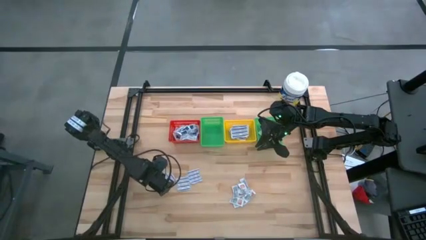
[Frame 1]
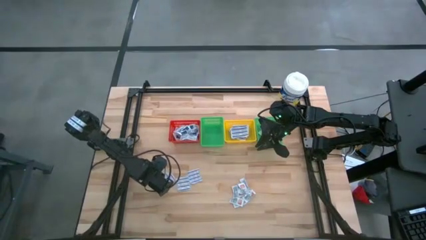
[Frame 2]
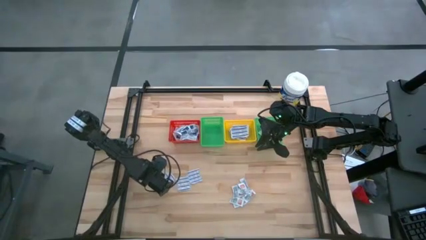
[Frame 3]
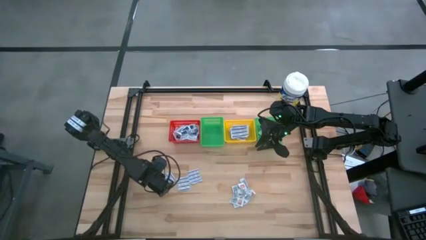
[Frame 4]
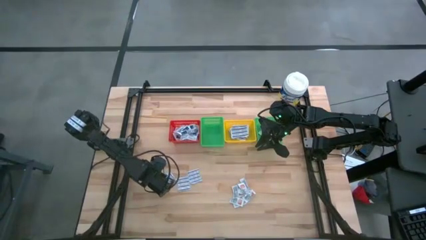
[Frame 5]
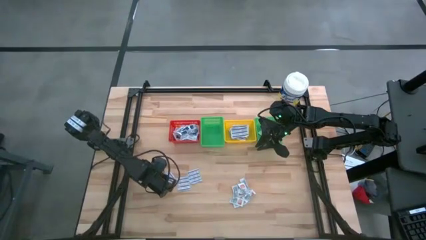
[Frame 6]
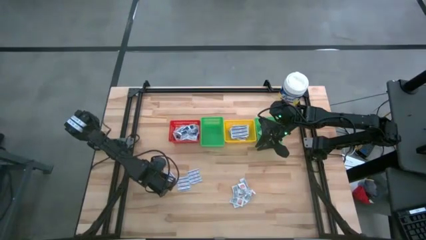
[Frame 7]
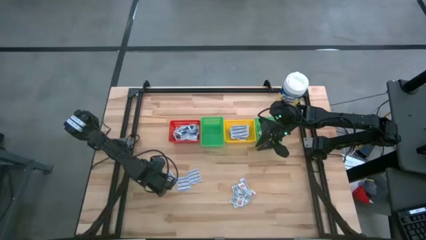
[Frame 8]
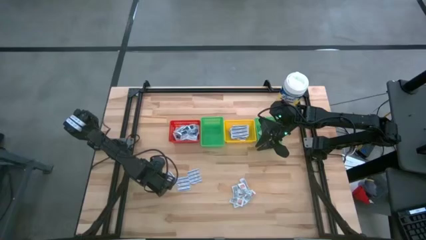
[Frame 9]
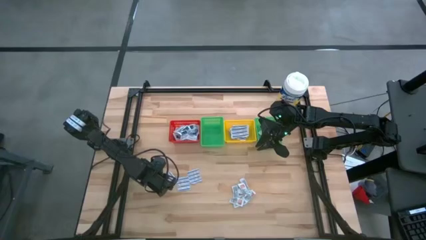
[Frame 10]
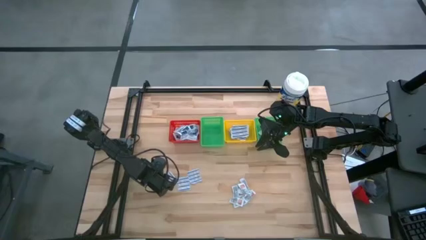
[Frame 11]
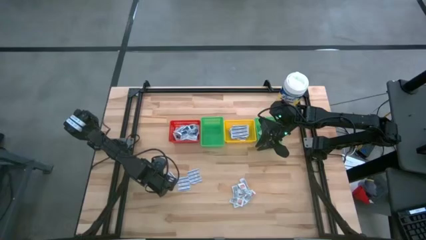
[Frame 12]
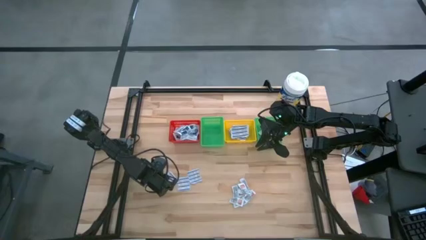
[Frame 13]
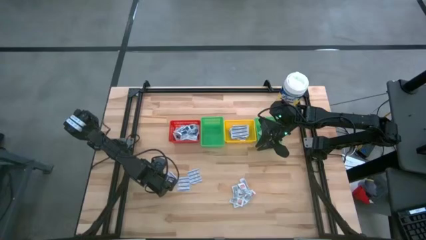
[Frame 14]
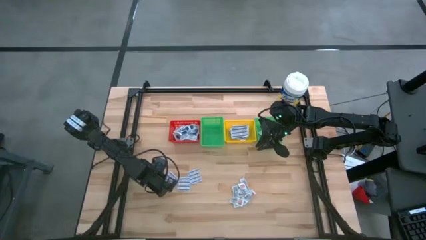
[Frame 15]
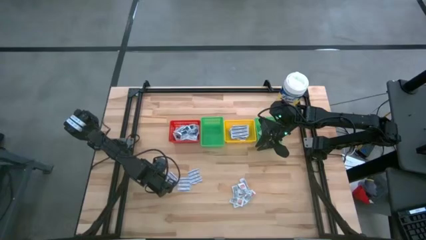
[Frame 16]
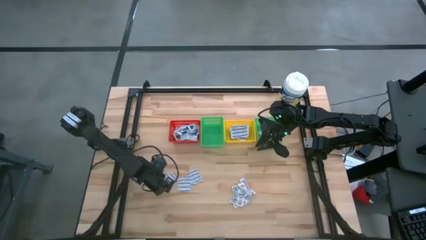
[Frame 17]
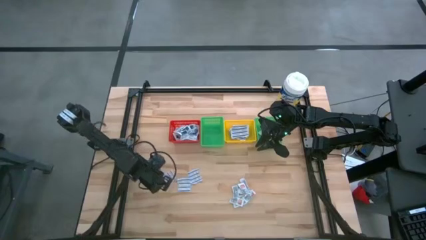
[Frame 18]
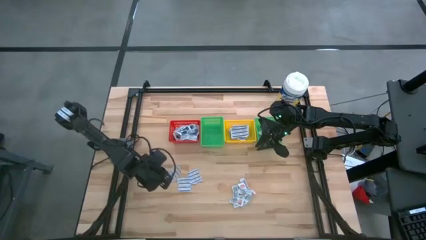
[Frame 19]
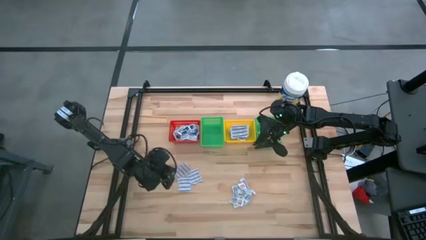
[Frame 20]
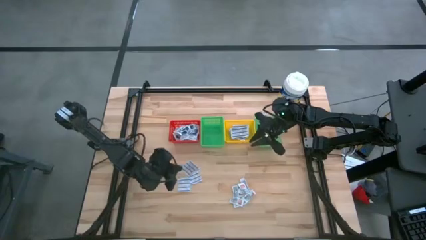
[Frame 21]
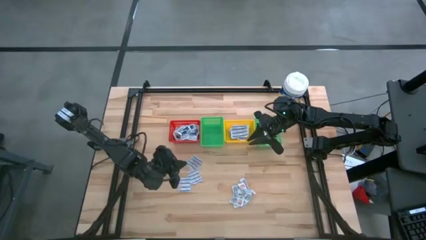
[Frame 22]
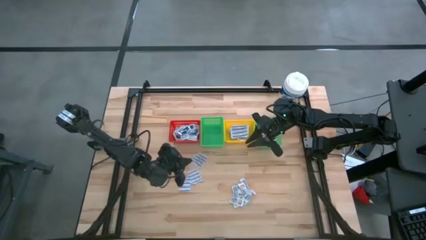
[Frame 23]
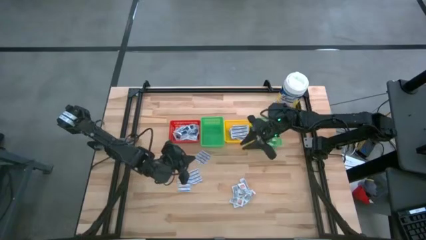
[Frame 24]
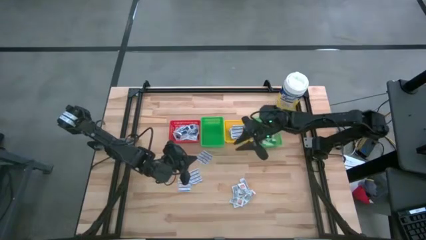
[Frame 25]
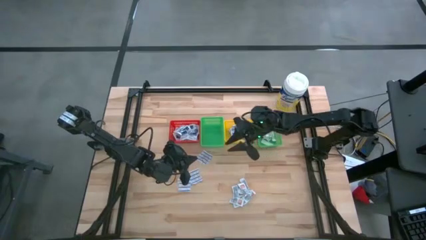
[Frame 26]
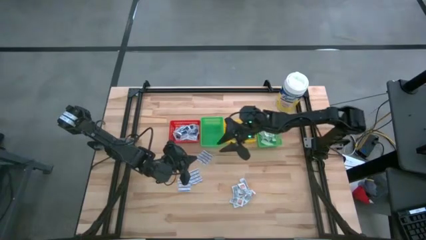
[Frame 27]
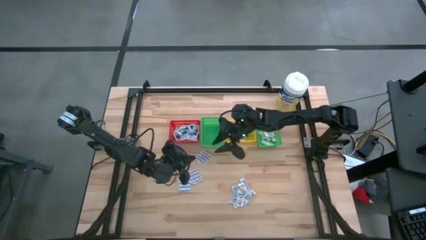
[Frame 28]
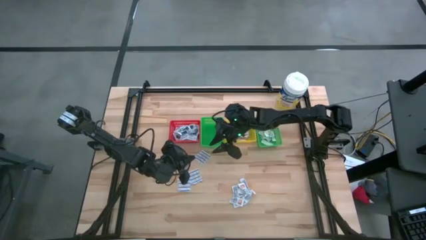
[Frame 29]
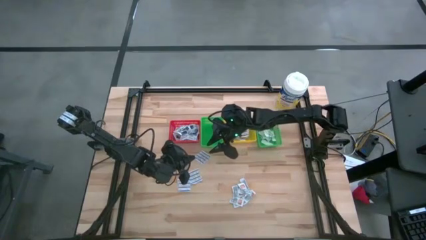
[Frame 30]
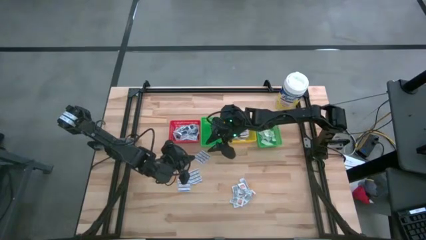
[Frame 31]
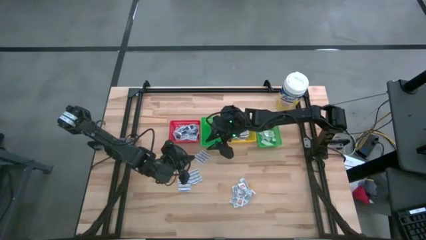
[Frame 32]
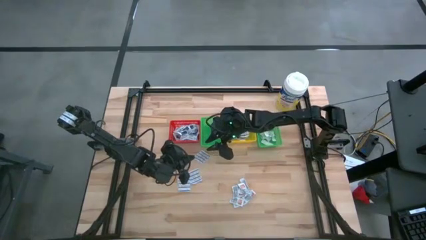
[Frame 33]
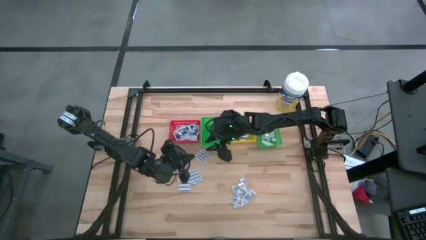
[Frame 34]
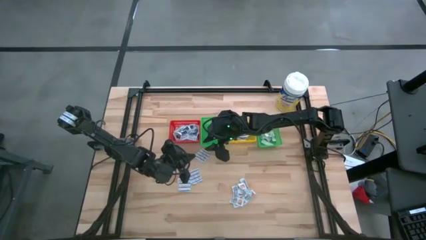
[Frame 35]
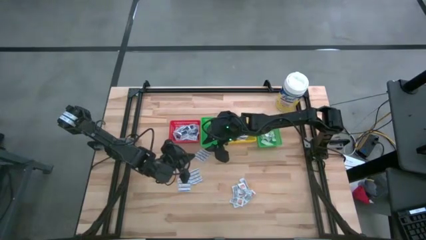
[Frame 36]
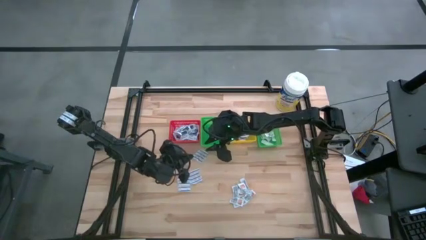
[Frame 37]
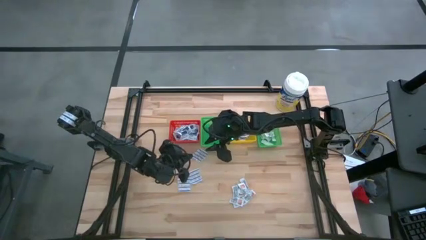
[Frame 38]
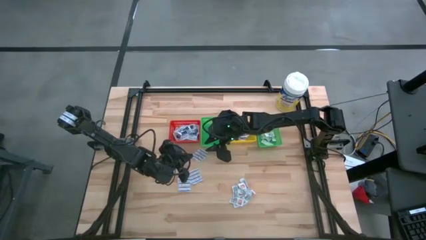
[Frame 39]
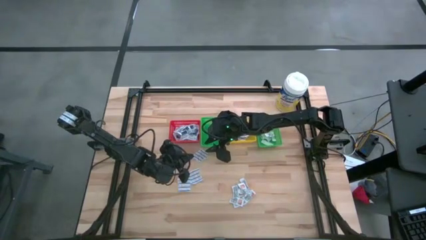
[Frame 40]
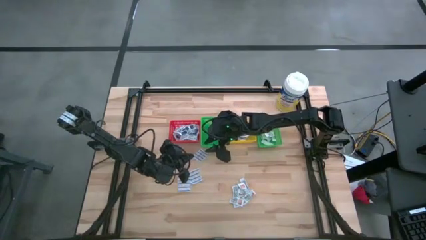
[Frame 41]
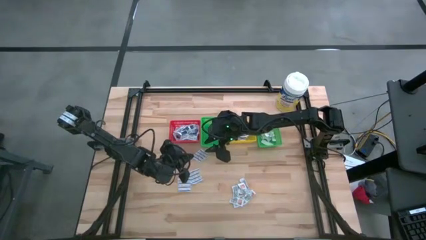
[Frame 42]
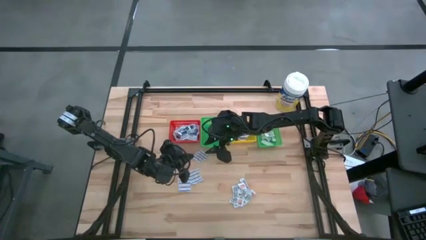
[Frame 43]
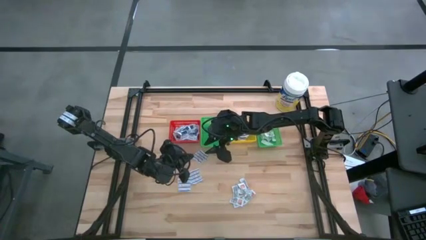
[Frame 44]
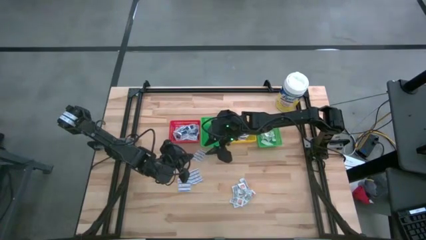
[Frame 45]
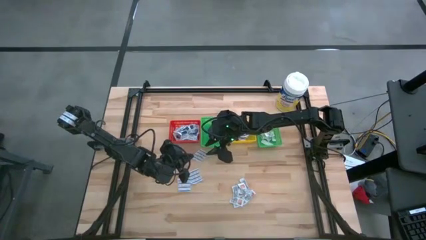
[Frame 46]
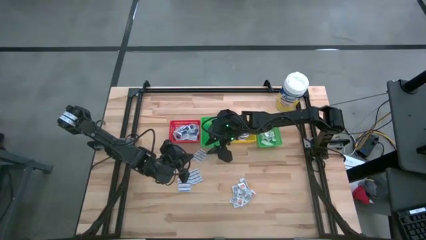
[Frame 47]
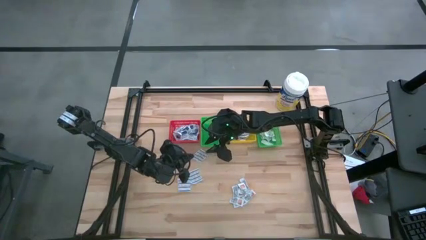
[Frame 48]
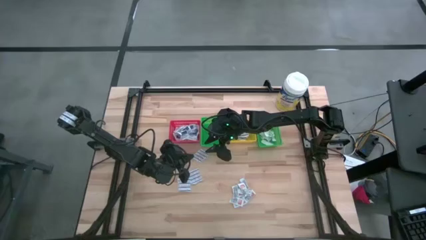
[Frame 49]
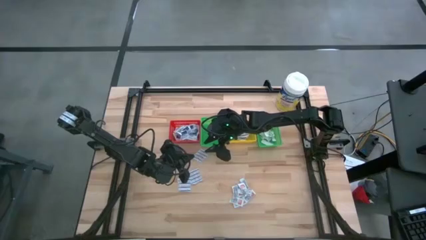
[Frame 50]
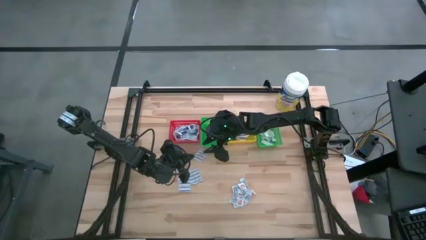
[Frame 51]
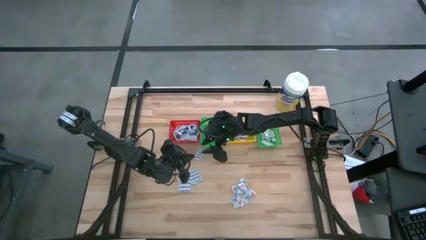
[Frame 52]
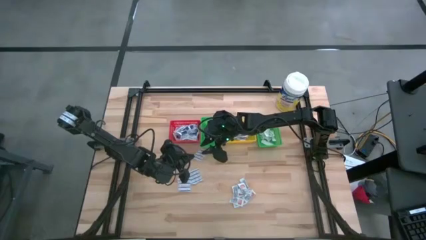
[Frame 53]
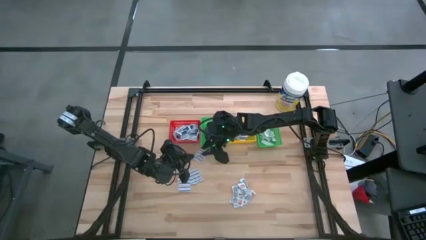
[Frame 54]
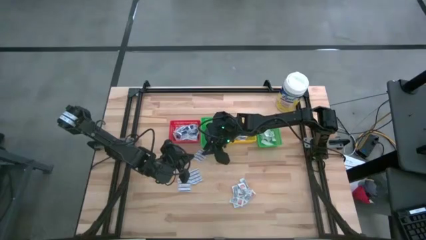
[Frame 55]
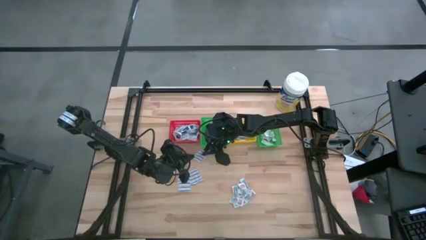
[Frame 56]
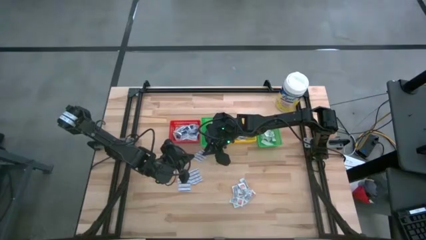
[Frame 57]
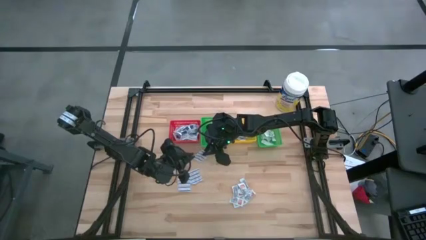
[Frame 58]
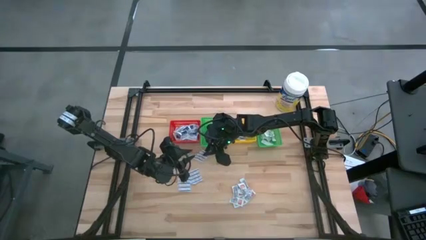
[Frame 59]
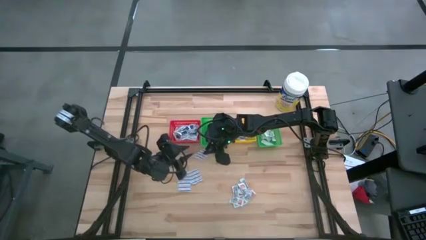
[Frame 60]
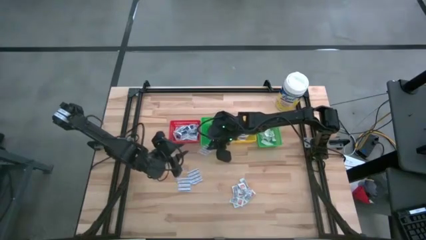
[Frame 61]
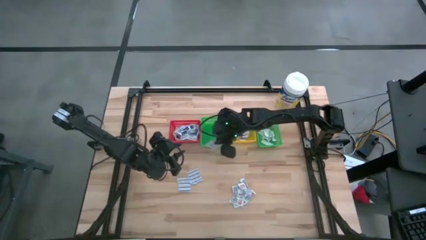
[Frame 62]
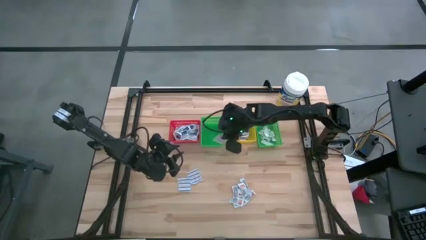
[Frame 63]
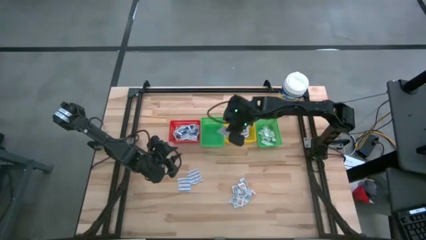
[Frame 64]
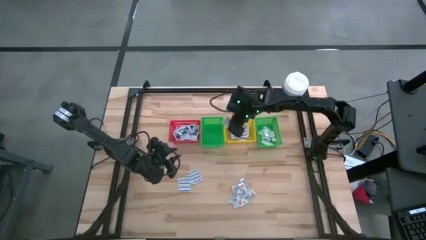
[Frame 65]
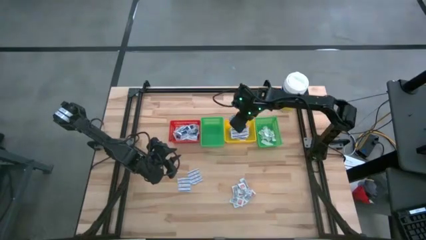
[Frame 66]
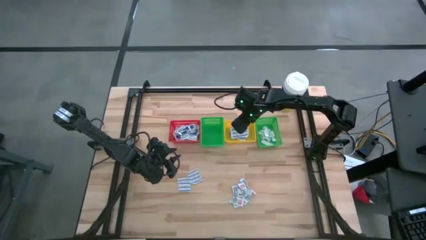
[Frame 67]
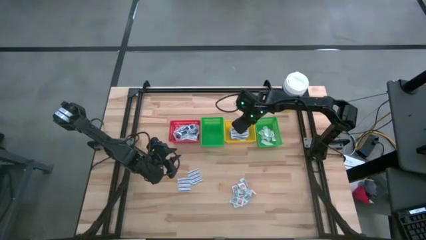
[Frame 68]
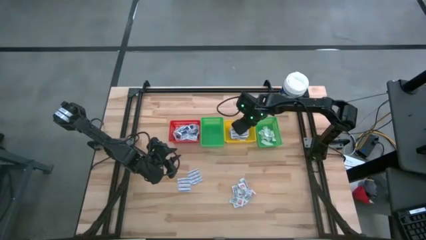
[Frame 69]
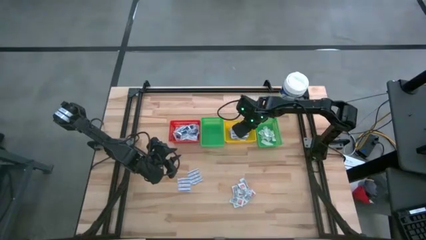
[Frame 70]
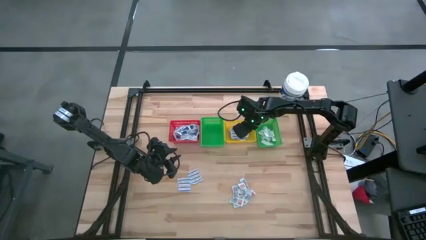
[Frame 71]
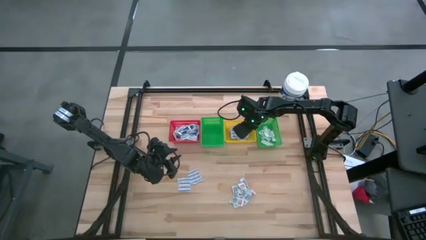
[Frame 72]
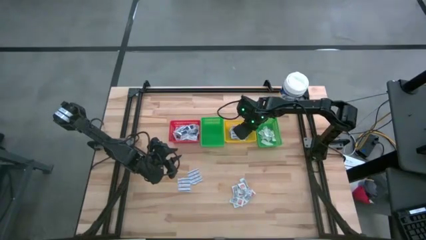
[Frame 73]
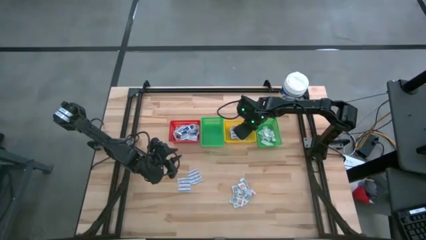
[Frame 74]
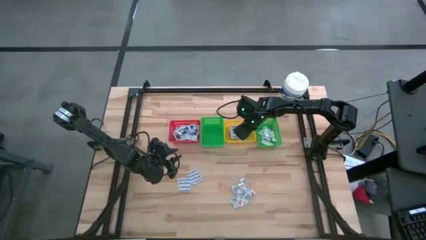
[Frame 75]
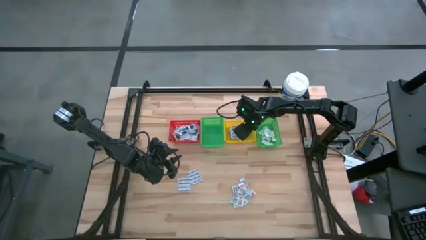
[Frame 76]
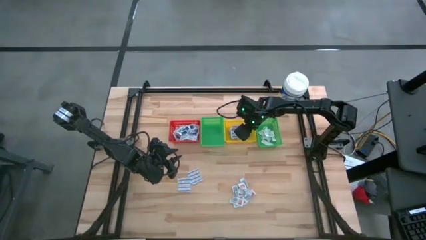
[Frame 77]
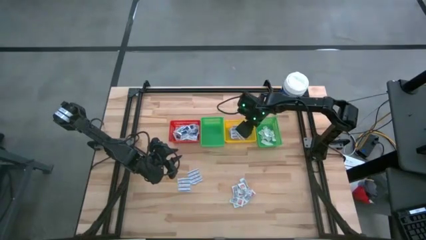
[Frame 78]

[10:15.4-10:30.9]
Task: Pick & Place First Aid Supplies
Put the blue bandage into the yellow basket
